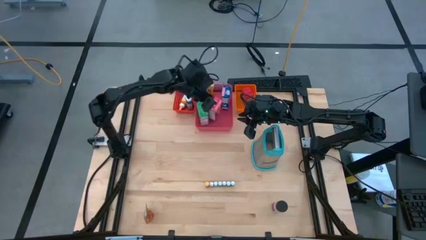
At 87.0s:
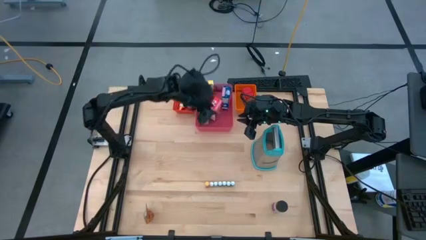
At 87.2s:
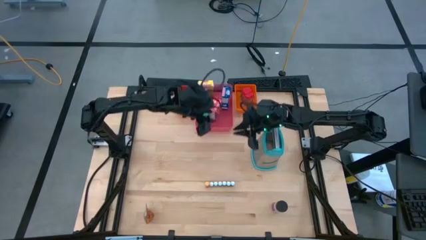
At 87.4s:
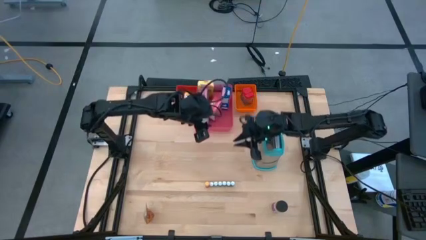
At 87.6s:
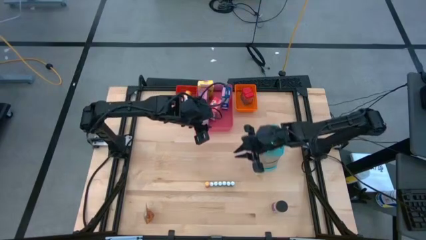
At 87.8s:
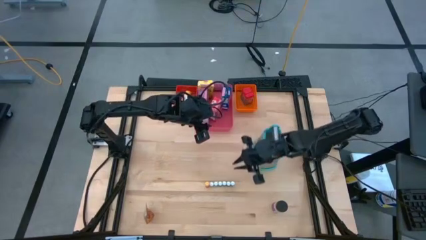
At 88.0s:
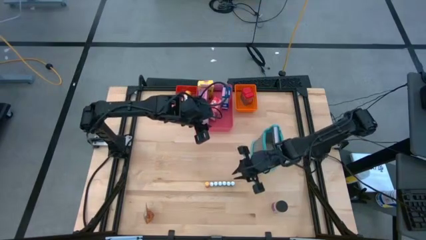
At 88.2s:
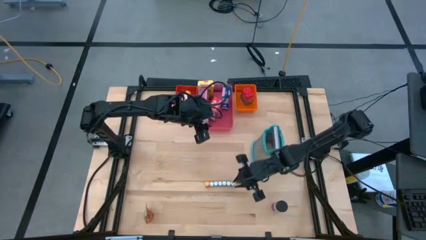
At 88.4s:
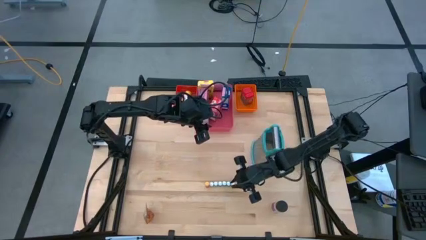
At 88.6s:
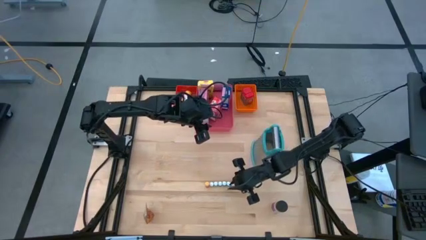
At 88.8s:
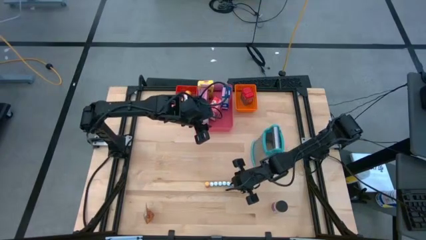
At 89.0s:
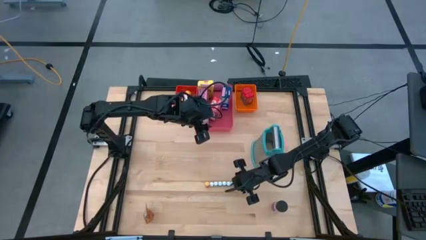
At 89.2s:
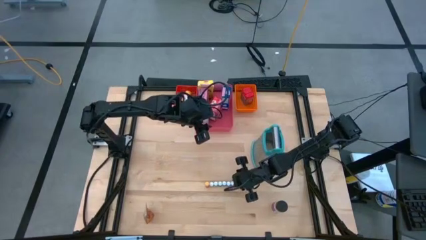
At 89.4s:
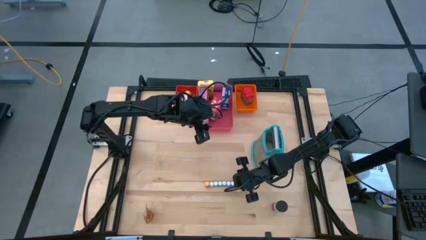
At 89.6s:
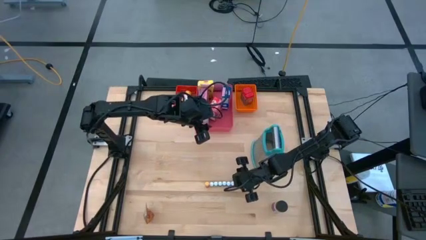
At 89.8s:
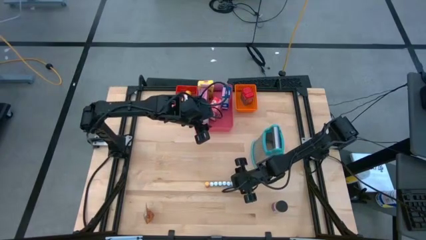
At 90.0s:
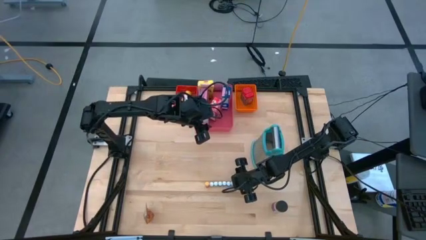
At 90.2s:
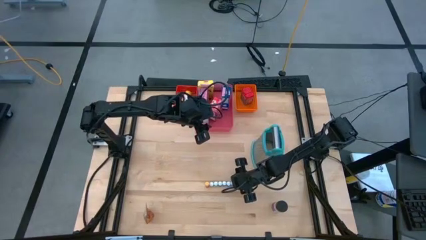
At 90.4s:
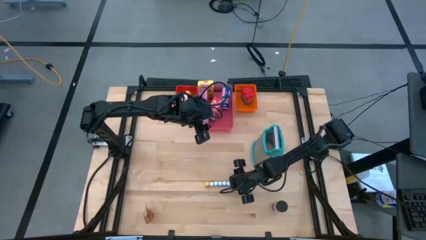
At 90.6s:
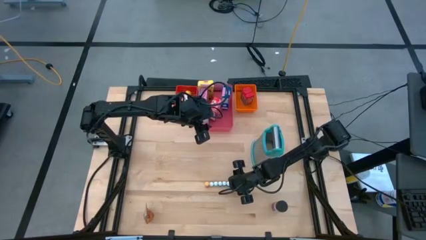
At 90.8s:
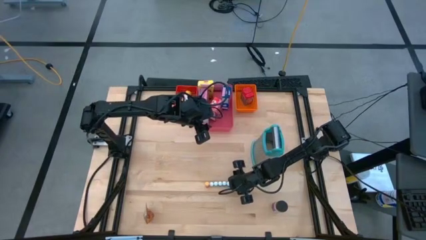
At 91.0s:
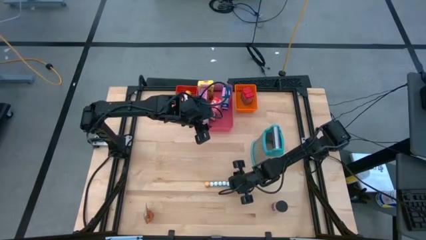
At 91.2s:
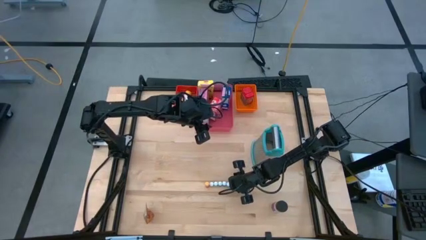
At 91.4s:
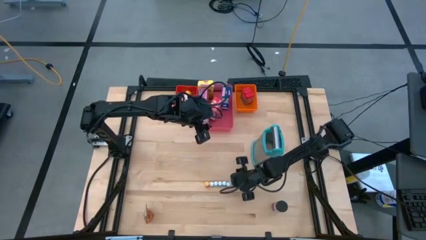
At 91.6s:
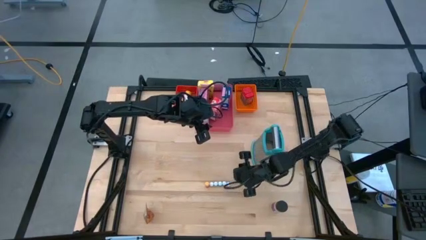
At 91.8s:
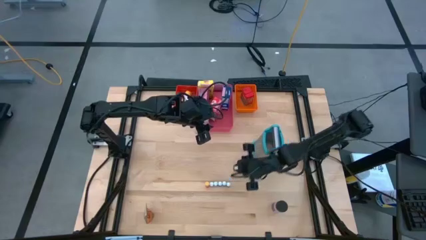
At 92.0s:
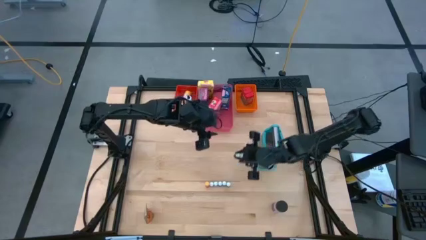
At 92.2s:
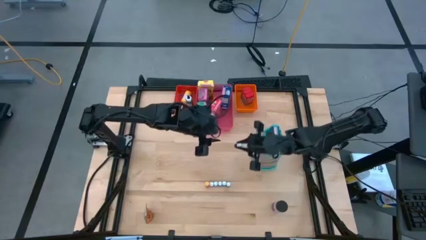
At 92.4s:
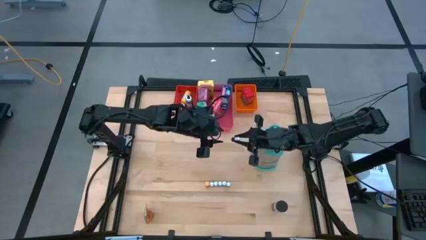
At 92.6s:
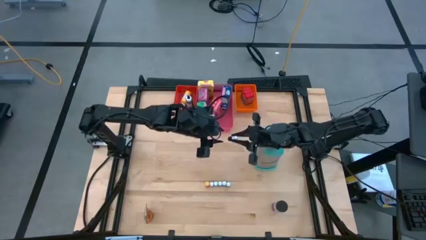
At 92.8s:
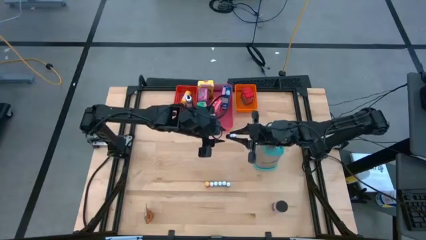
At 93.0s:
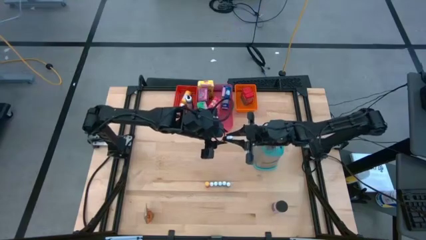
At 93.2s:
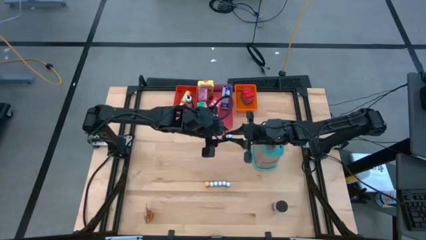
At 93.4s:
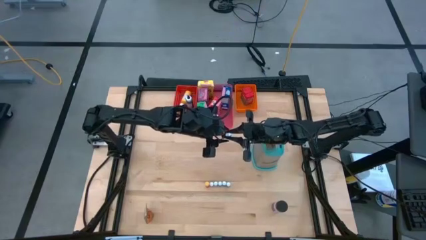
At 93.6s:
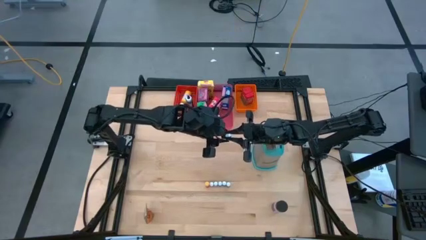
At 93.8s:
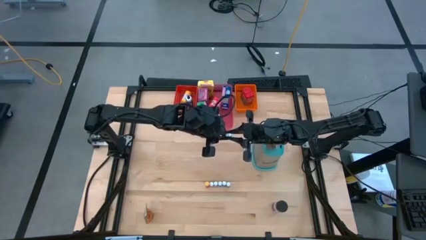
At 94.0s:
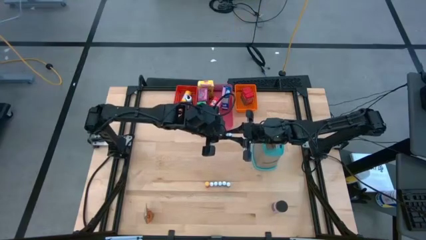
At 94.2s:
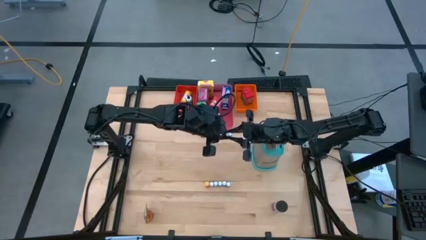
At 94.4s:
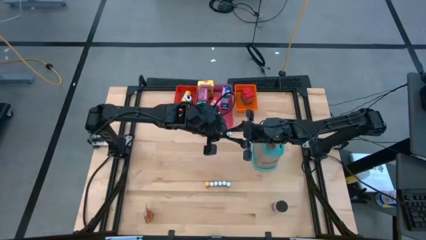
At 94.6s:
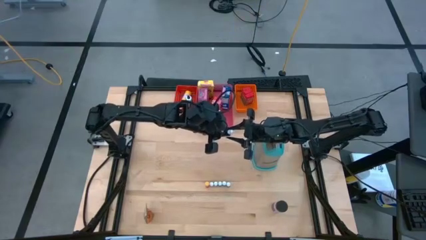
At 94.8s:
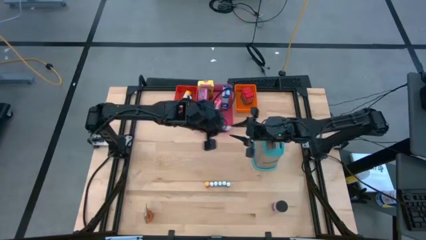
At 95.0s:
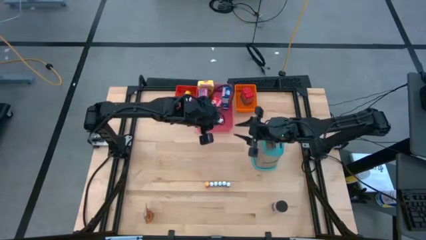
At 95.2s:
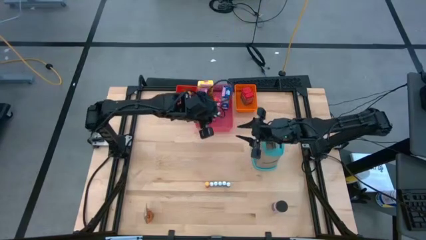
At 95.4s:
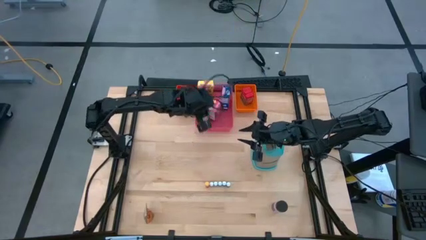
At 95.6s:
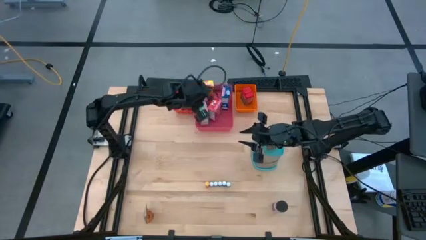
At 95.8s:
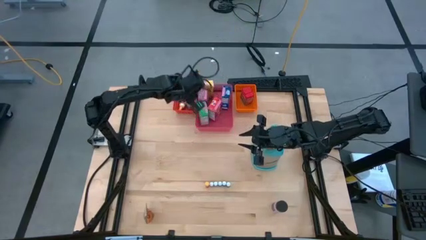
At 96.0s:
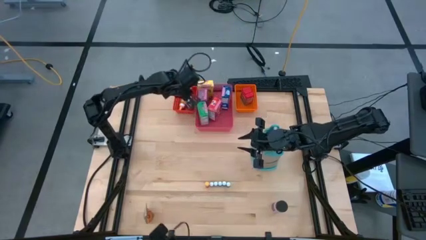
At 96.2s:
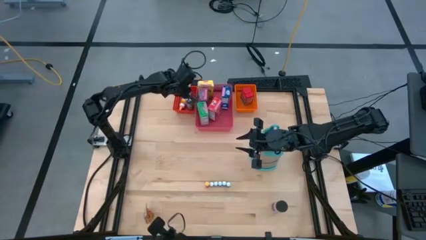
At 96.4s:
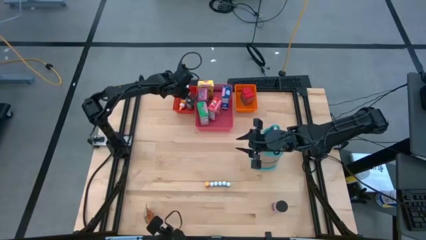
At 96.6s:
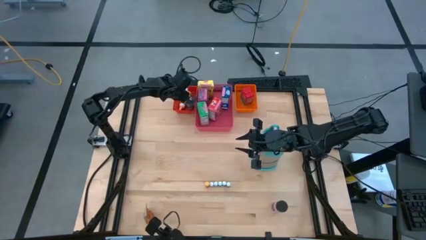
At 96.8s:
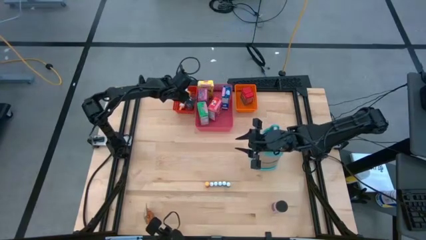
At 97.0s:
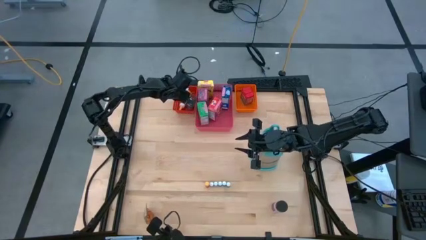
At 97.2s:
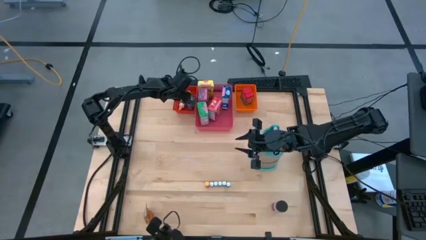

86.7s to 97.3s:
Task: Pick & Place Kitchen Items
Put the small black food coloring bottle into the red bin

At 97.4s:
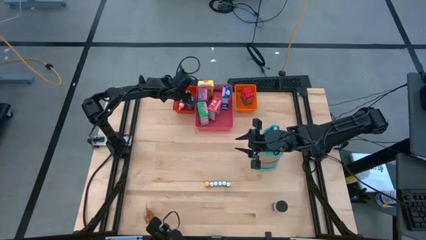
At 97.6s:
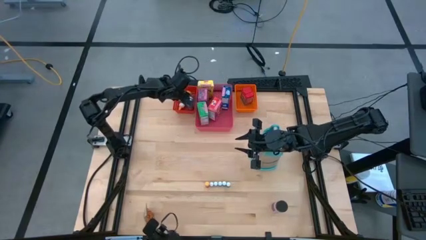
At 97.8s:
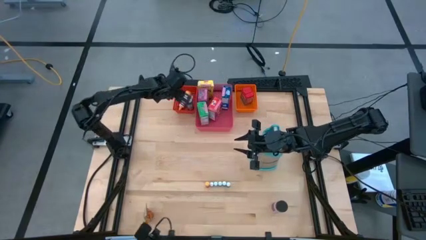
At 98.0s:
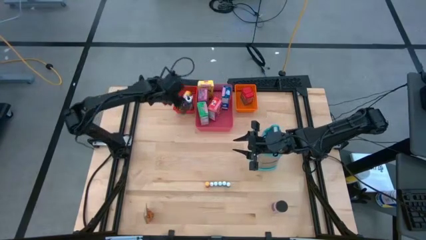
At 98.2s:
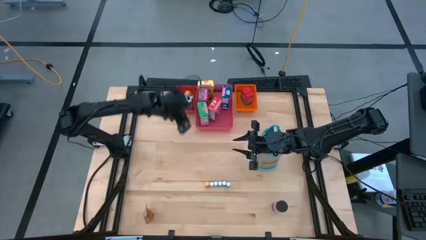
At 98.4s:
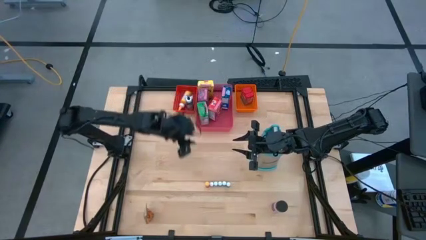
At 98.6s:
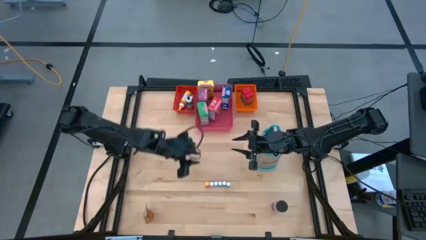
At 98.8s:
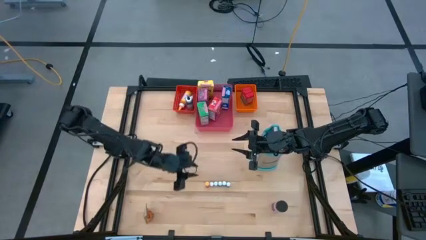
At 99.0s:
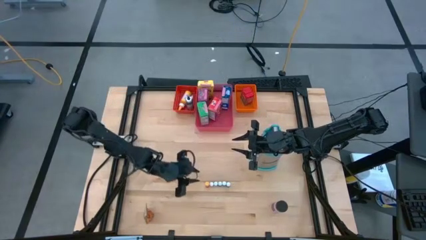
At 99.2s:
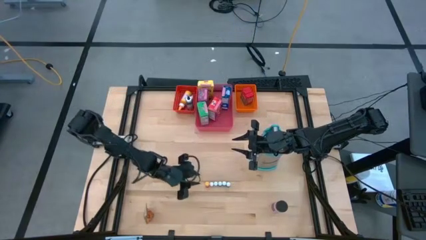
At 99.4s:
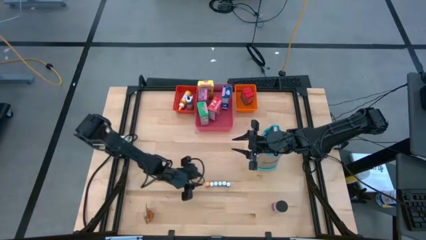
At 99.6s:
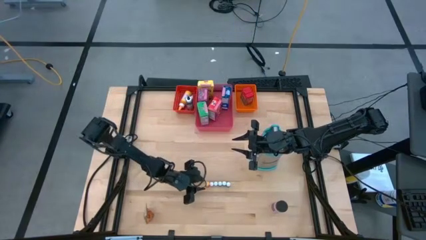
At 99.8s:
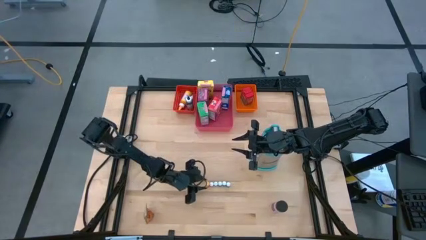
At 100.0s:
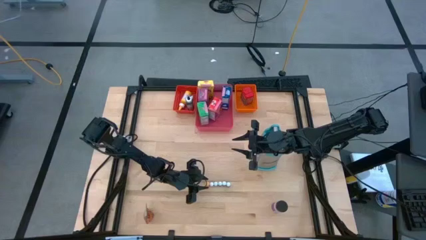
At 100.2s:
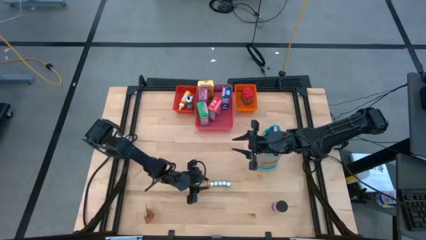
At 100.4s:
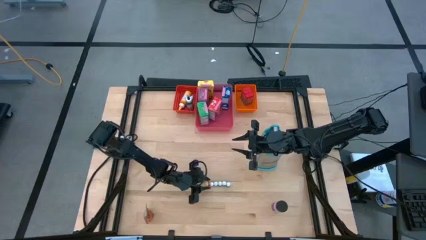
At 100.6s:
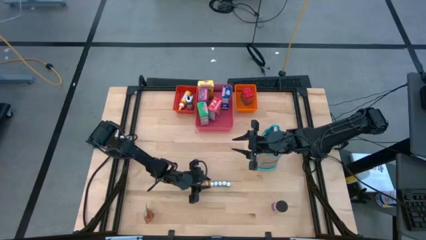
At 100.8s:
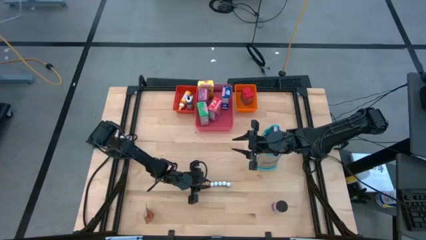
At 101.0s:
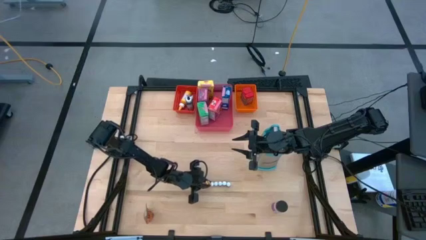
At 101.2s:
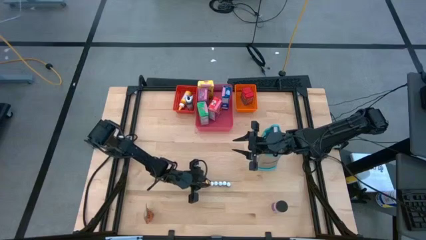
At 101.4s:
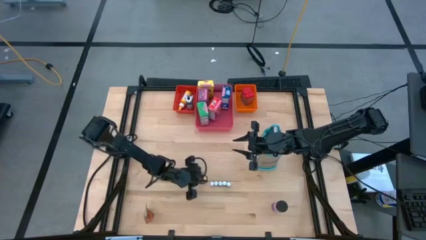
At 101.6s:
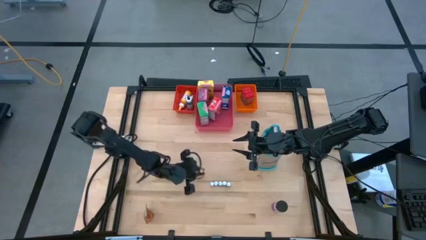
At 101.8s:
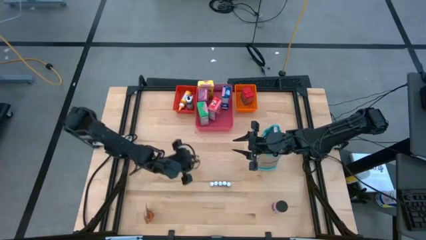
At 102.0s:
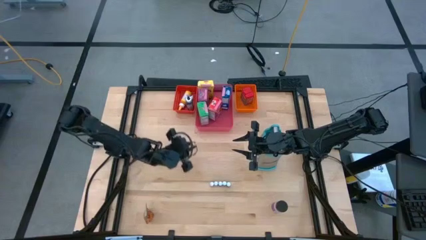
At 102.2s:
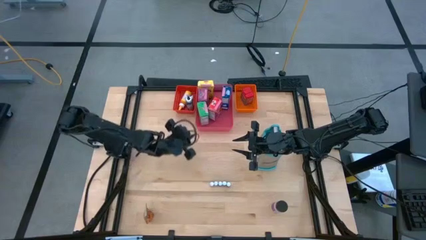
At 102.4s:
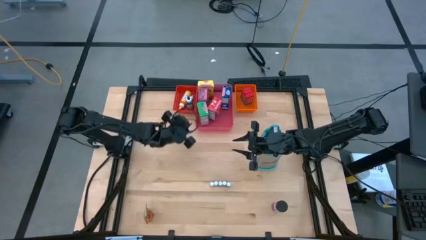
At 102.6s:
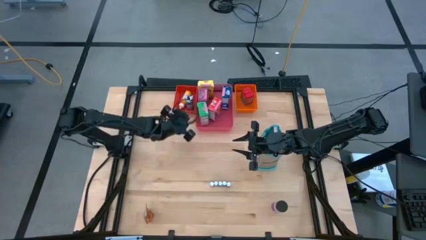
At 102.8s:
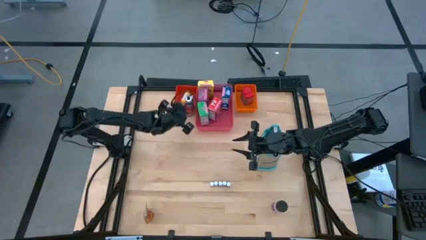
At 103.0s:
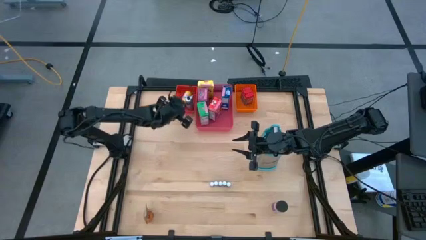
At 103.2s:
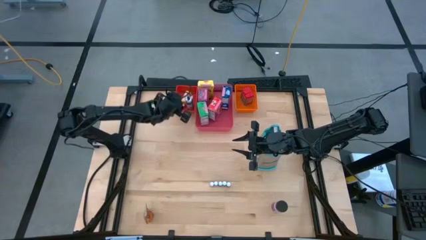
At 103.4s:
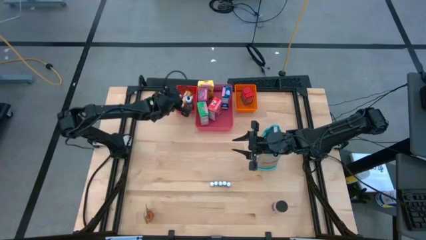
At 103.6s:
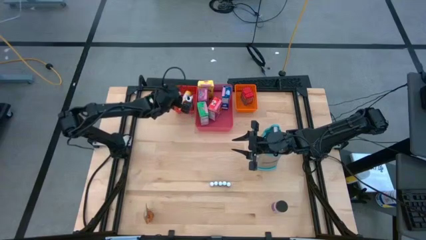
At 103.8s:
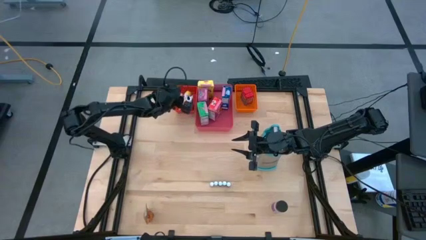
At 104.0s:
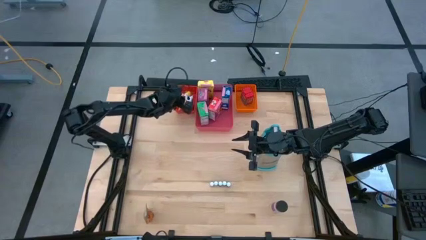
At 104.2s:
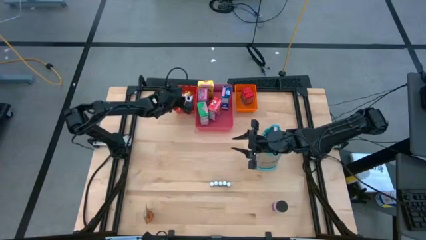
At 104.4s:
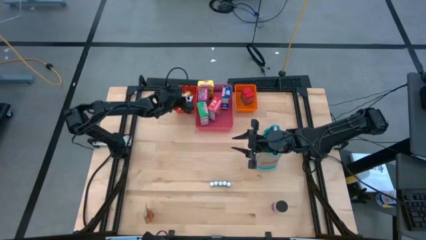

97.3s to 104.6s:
Put the small yellow food coloring bottle into the red bin
